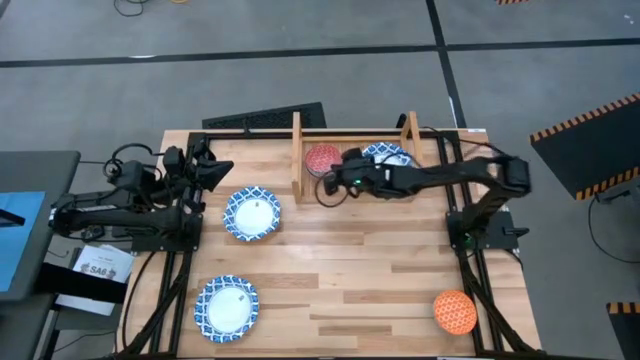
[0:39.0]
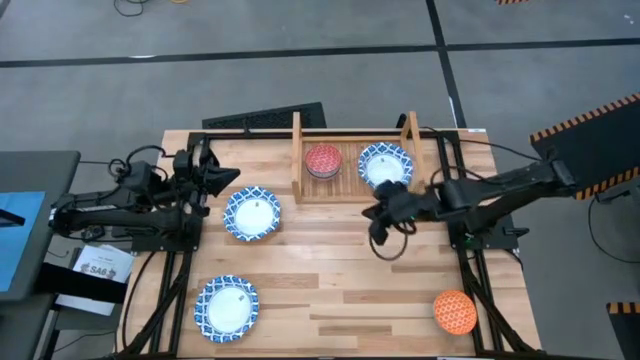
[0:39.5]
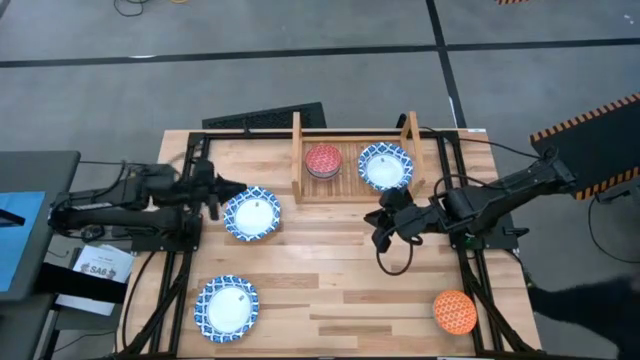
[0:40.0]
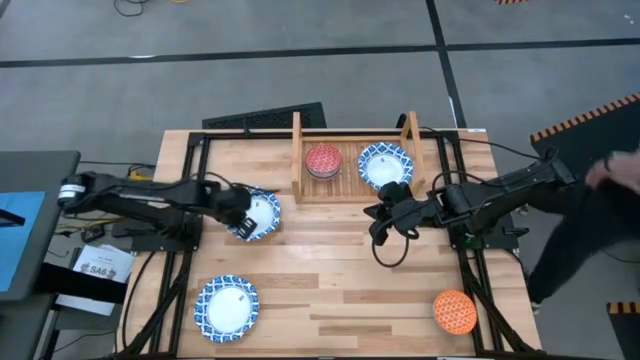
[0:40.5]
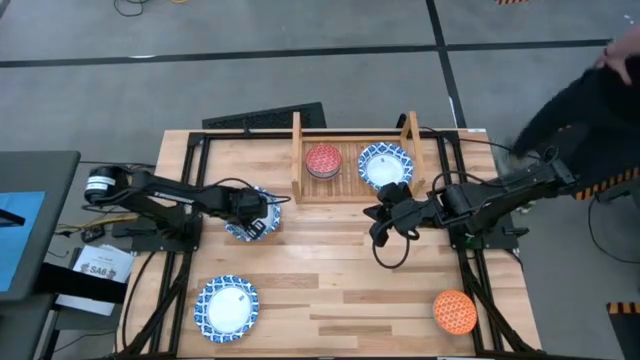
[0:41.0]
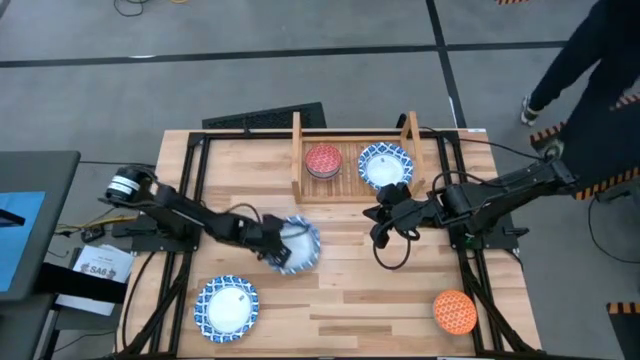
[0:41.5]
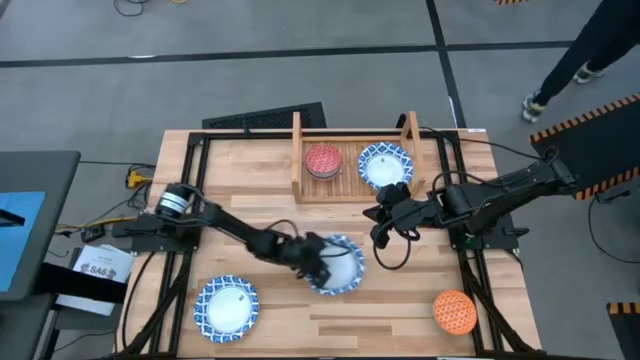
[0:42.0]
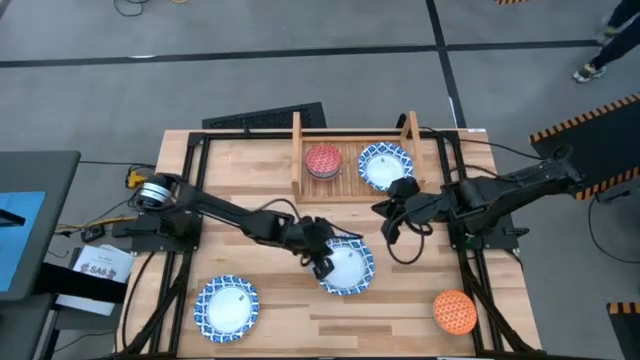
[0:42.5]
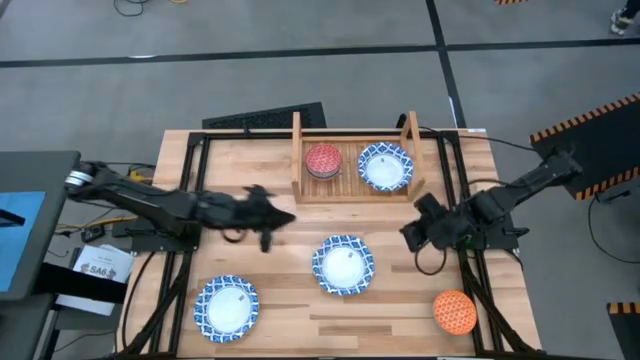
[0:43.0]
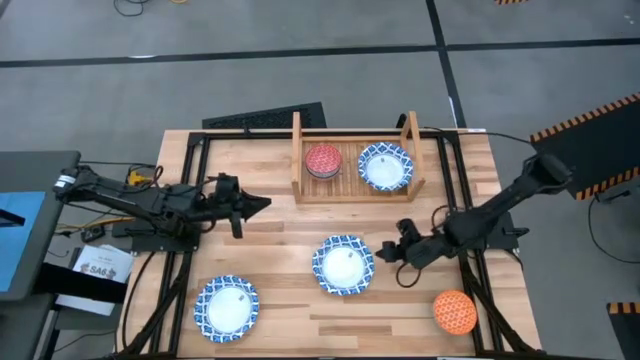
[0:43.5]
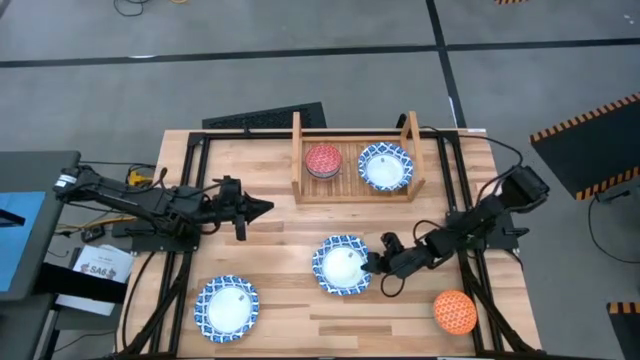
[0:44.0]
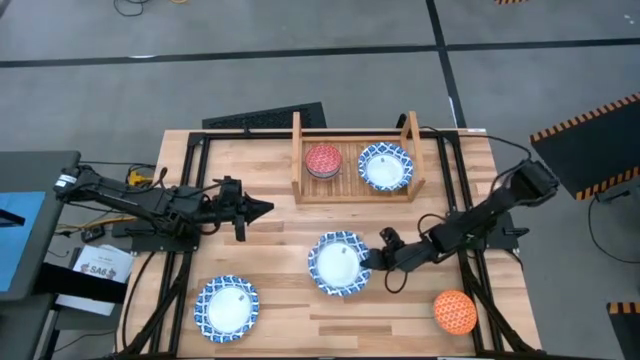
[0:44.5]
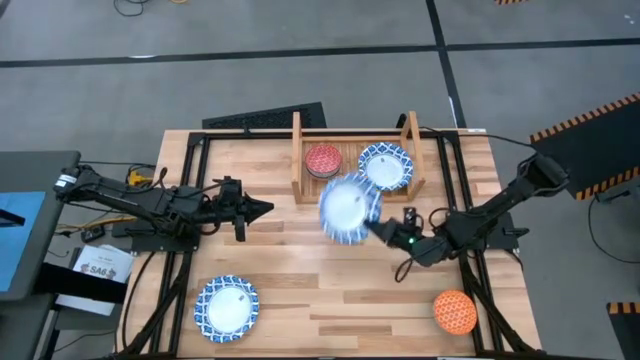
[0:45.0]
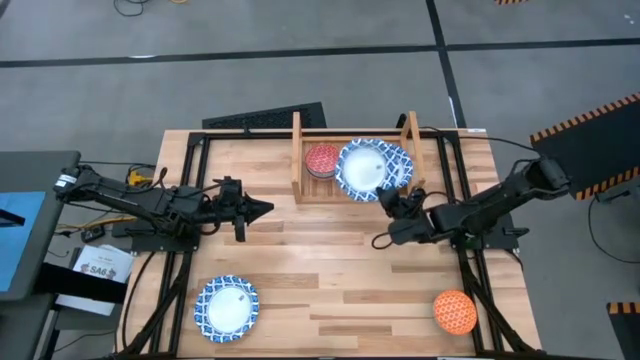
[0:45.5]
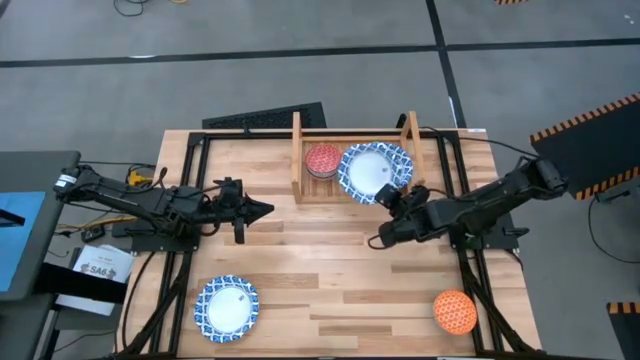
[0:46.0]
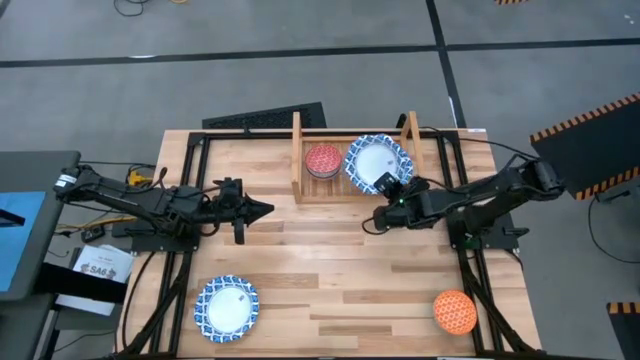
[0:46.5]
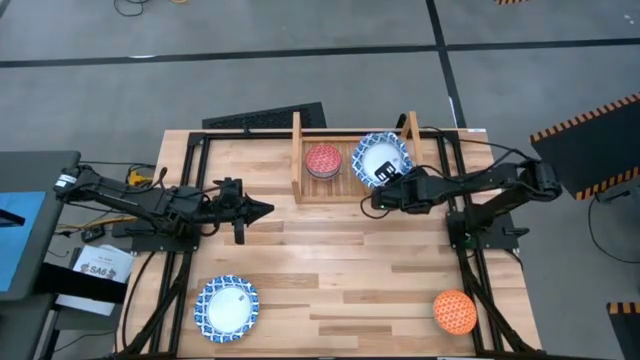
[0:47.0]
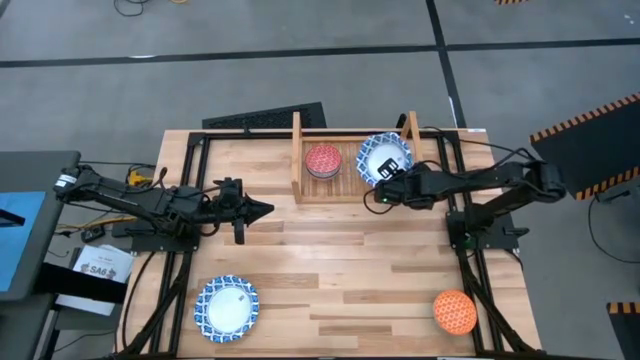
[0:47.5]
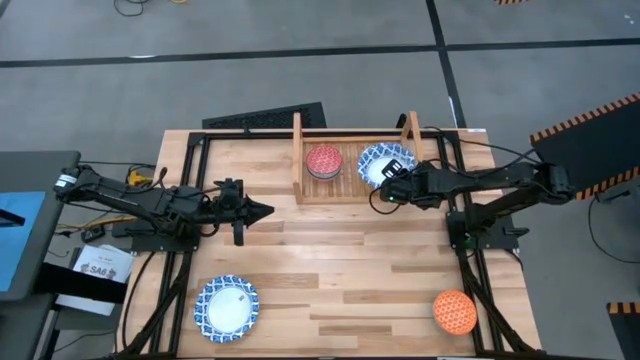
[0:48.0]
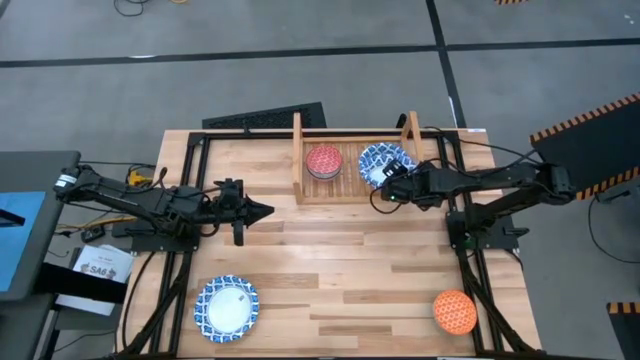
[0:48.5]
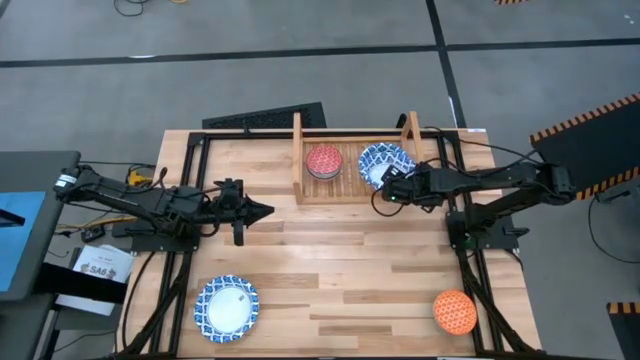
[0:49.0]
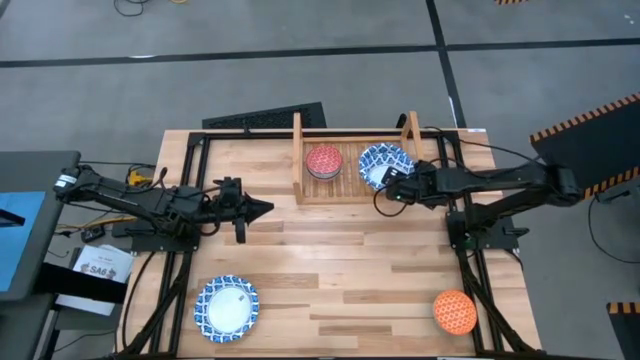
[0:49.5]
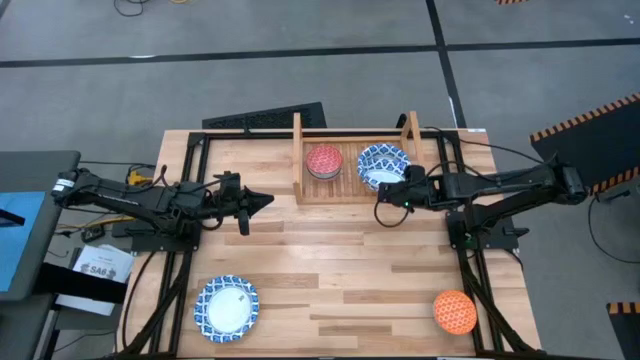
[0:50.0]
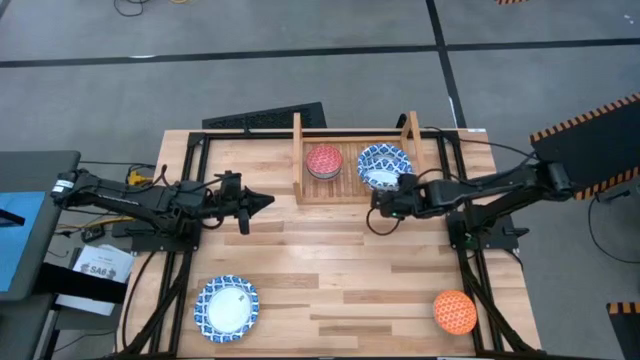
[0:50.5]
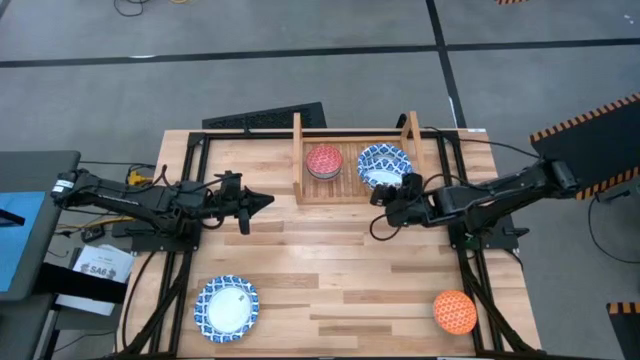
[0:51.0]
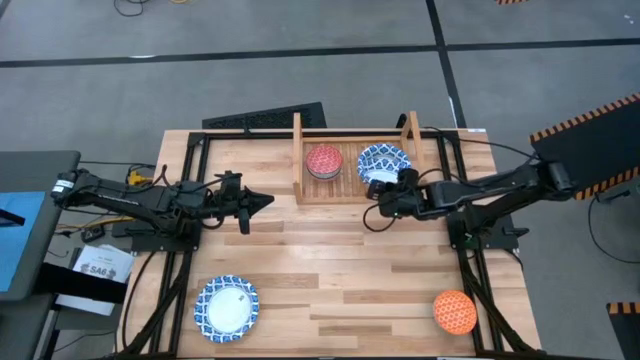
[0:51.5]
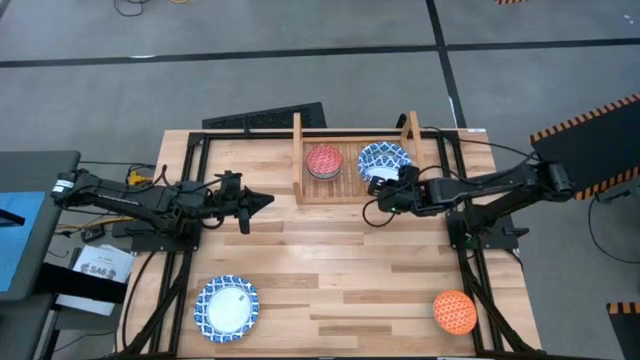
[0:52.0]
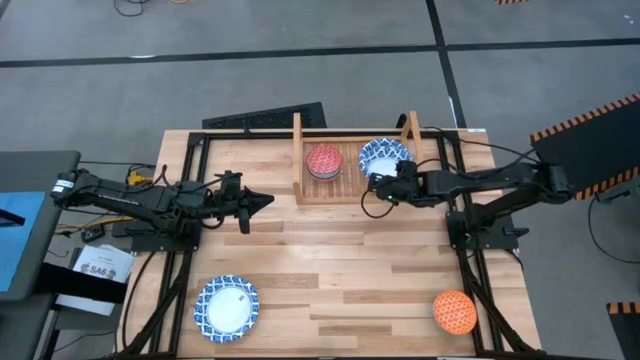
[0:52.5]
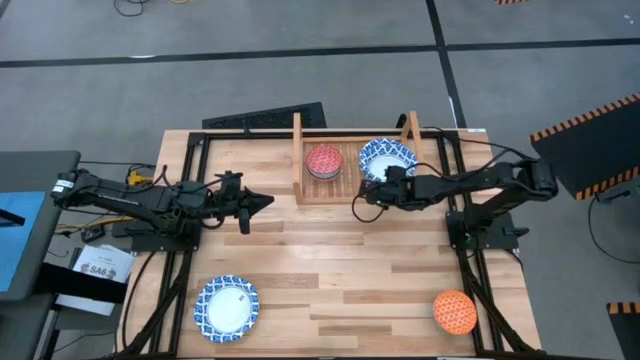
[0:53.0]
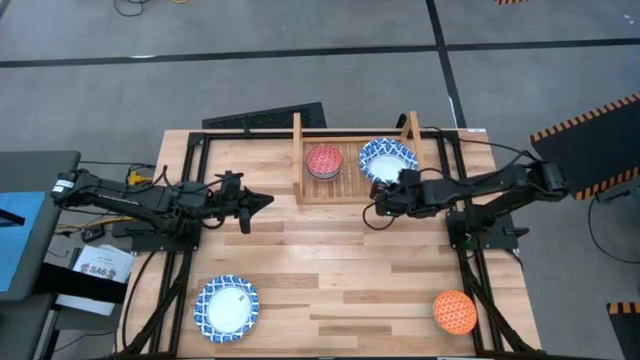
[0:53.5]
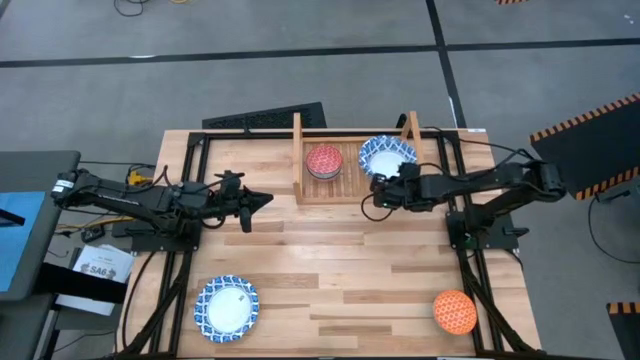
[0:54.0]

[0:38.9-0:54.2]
Task: Place and stack bowls onto a shelf
Stack the large blue pattern bowl into the blue pattern large bowl on the shelf

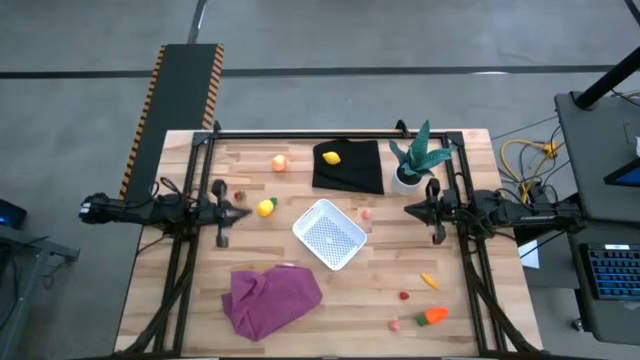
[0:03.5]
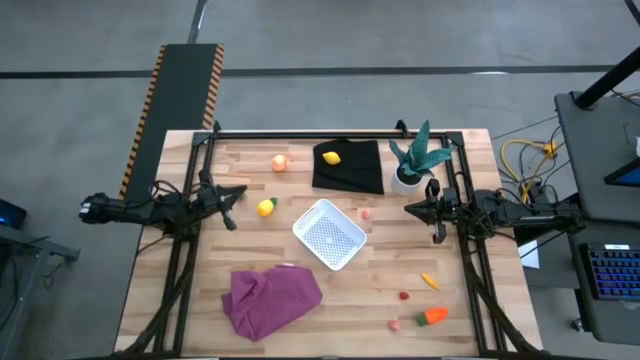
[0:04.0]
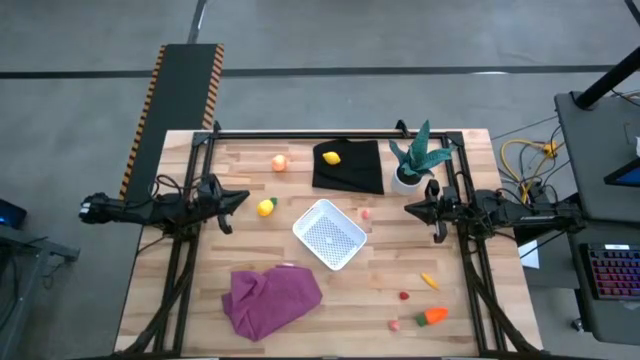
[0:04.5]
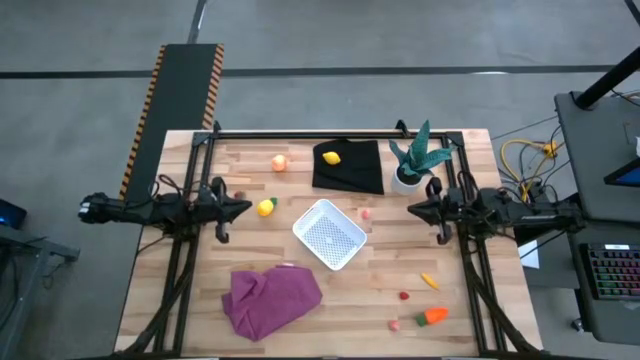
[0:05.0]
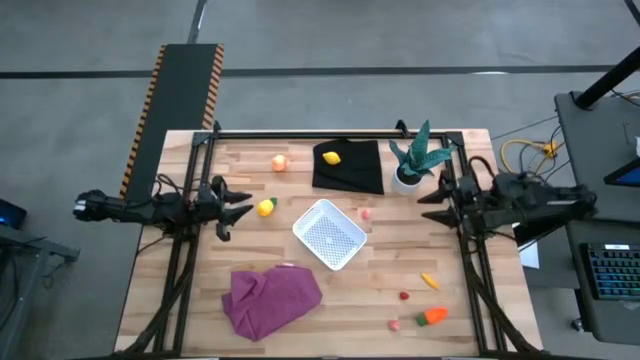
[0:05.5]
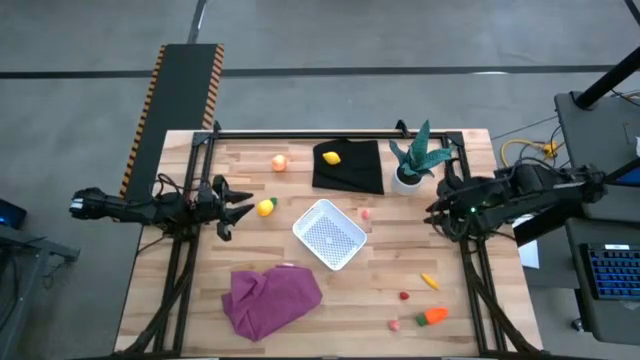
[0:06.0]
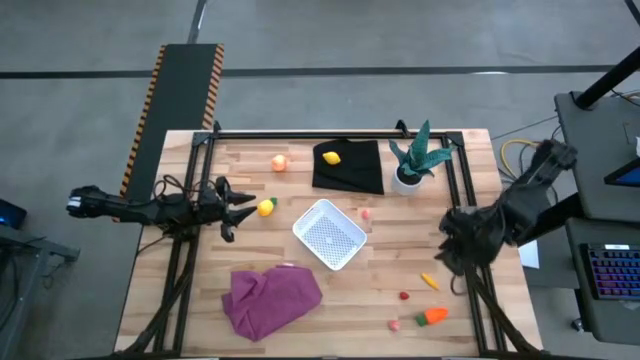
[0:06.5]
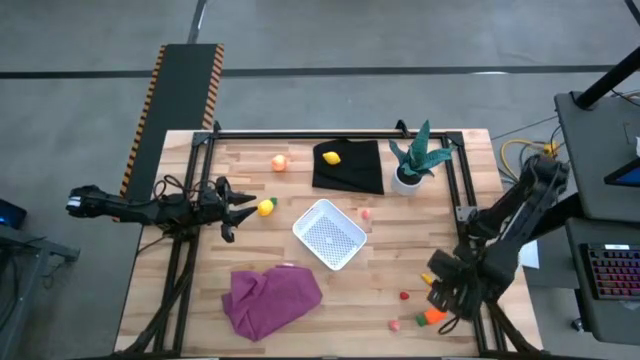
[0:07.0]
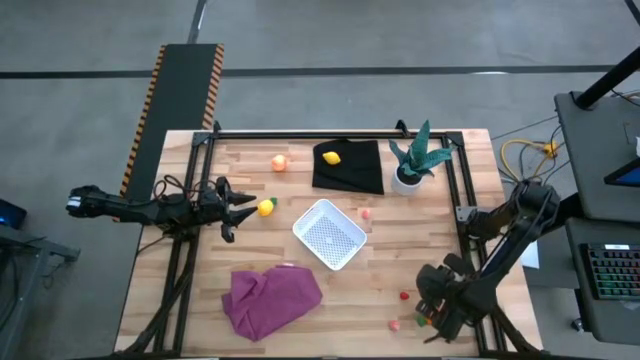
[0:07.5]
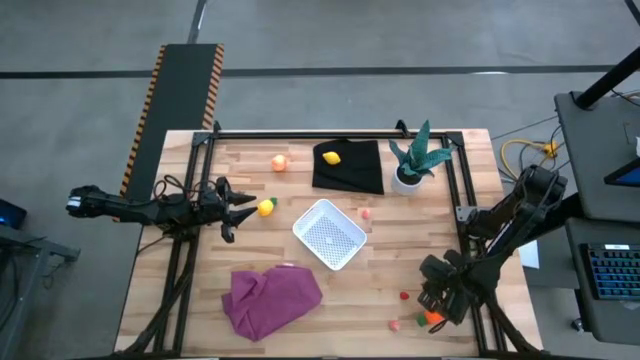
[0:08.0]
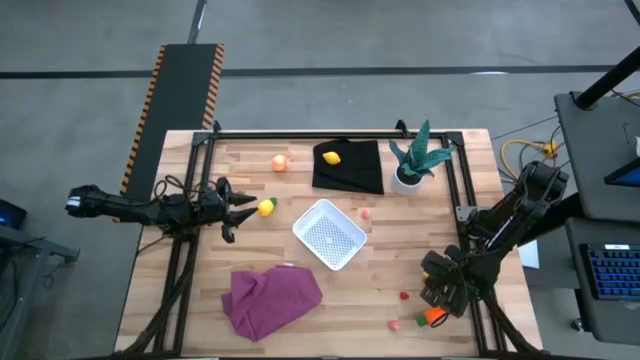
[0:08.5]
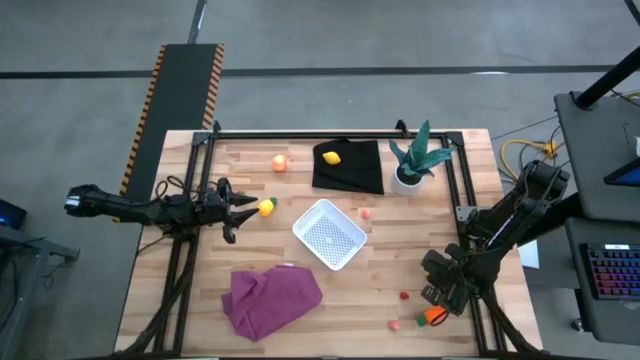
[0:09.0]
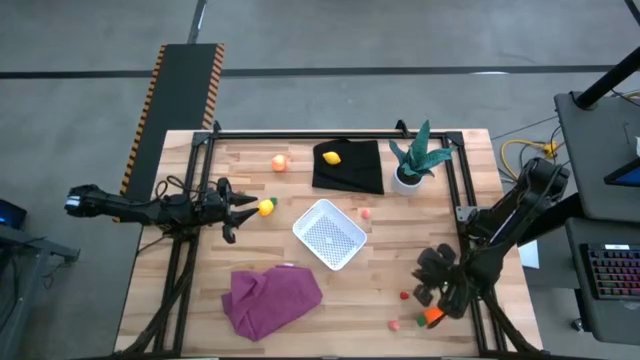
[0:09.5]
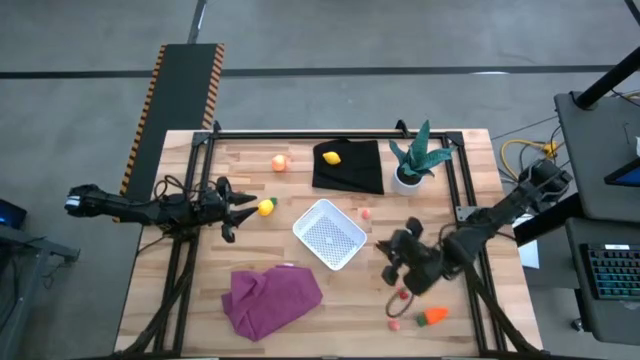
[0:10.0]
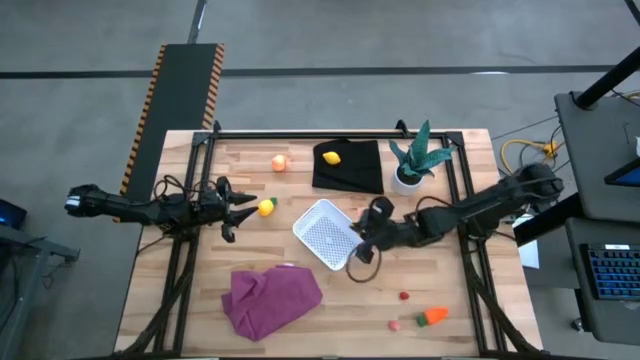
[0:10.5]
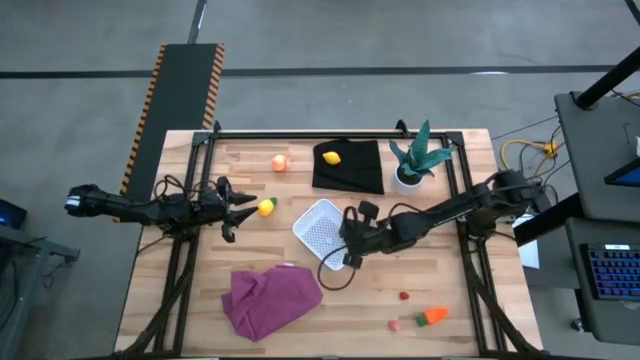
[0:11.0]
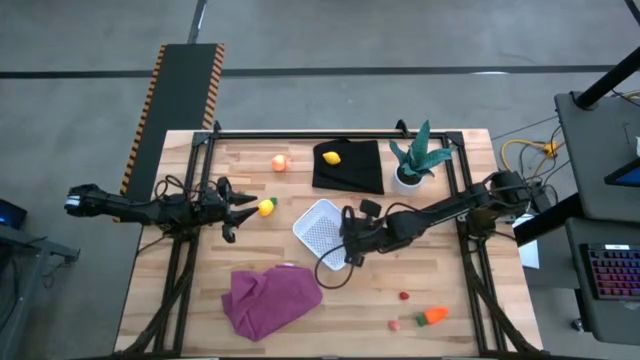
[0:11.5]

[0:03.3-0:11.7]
Task: Pick and placing Produce into tupperware
Put the corn into the white bin
